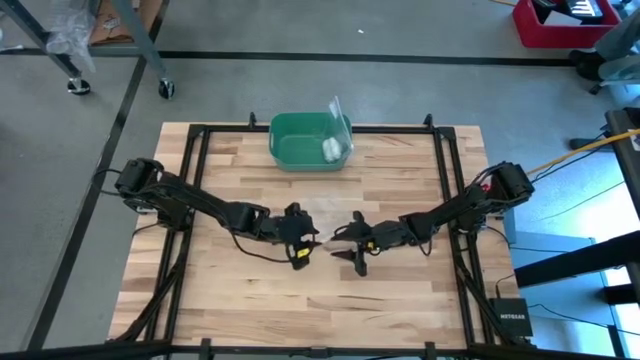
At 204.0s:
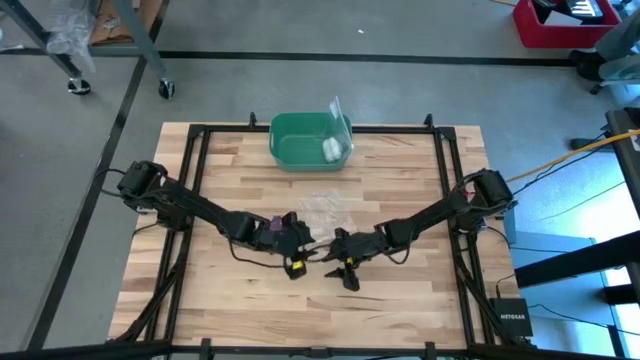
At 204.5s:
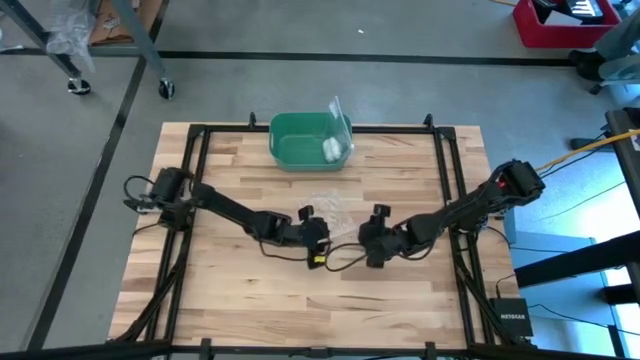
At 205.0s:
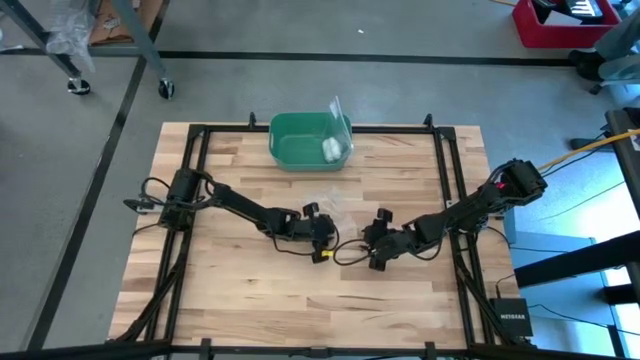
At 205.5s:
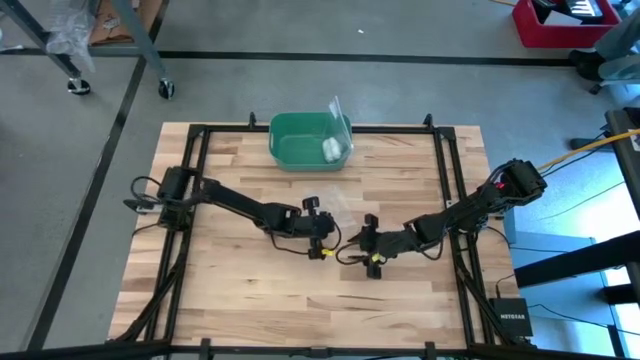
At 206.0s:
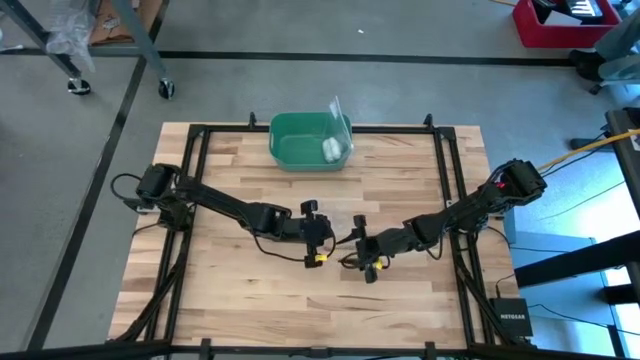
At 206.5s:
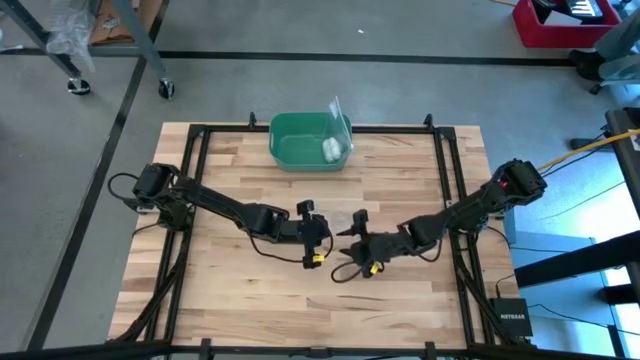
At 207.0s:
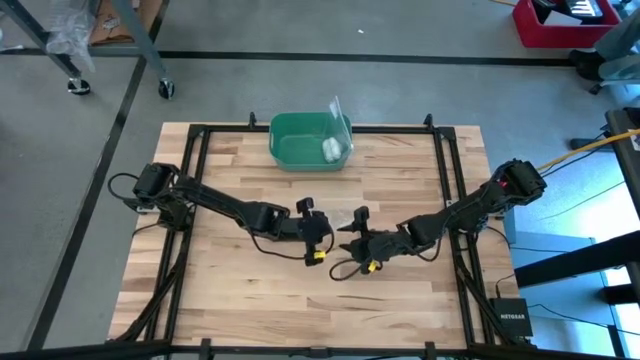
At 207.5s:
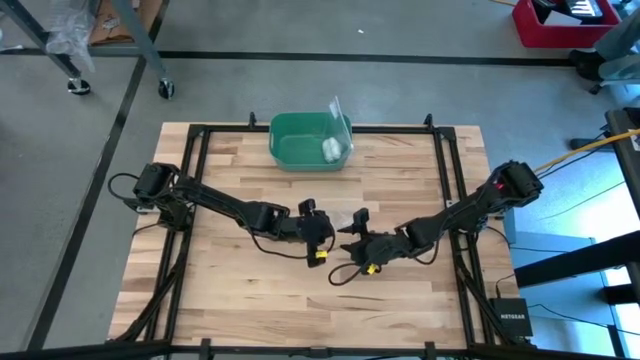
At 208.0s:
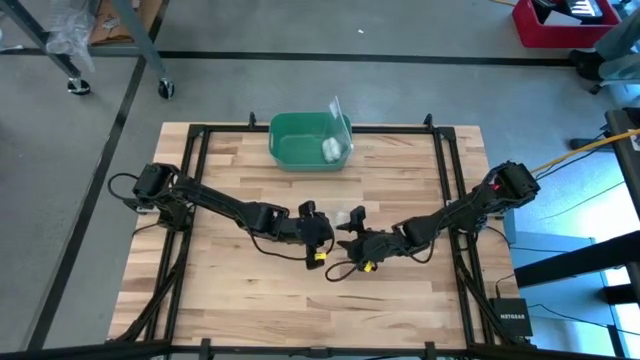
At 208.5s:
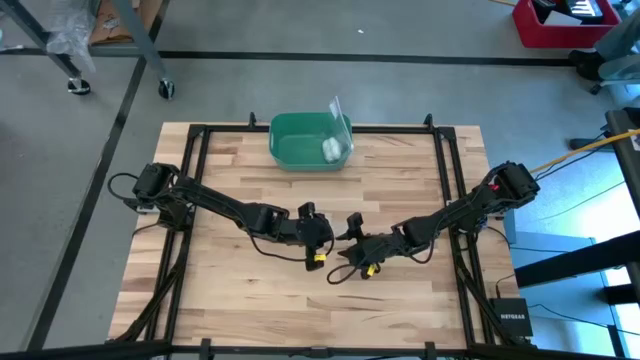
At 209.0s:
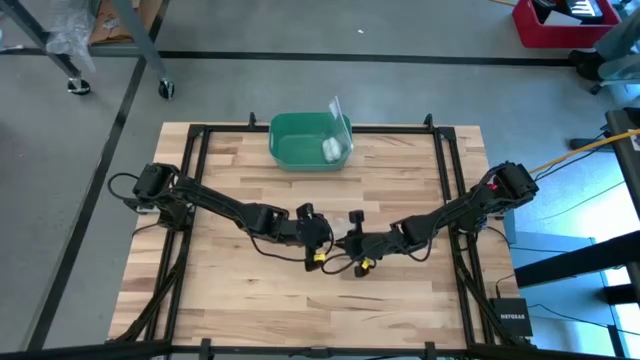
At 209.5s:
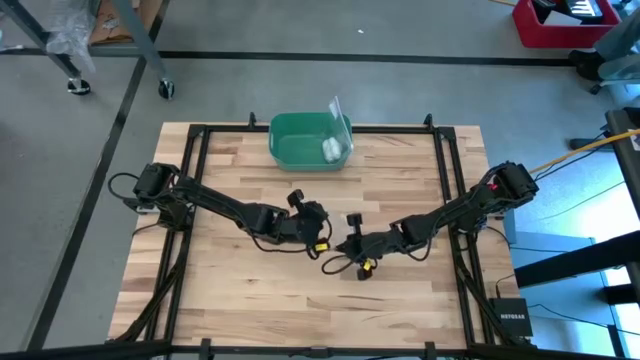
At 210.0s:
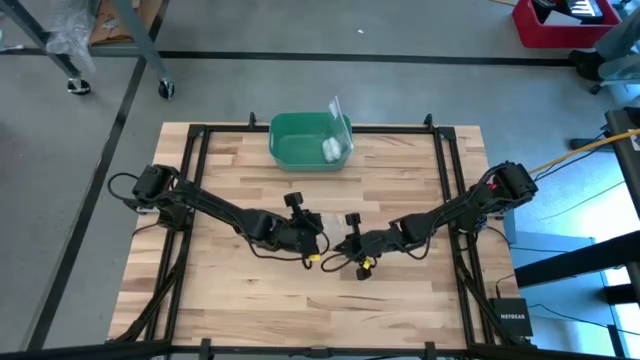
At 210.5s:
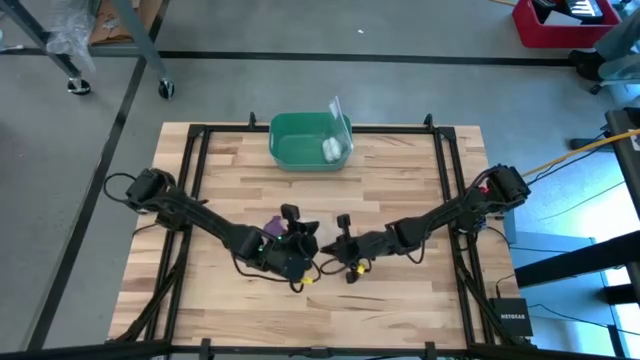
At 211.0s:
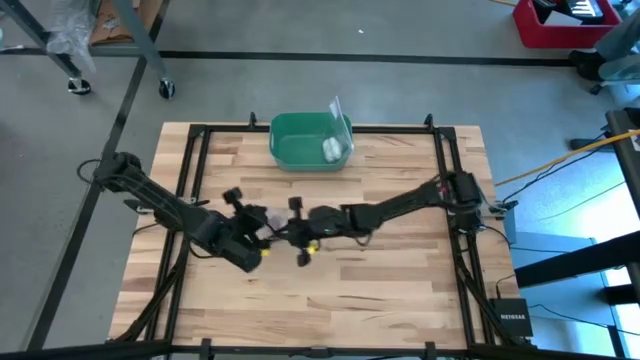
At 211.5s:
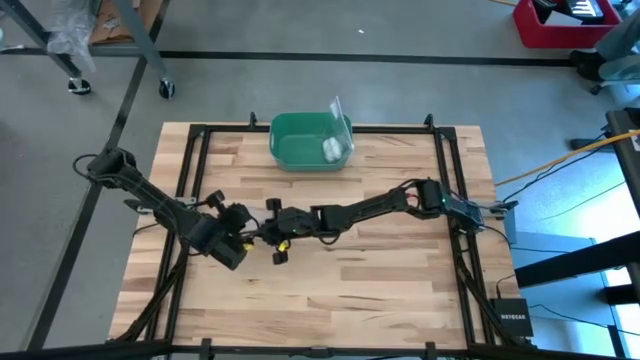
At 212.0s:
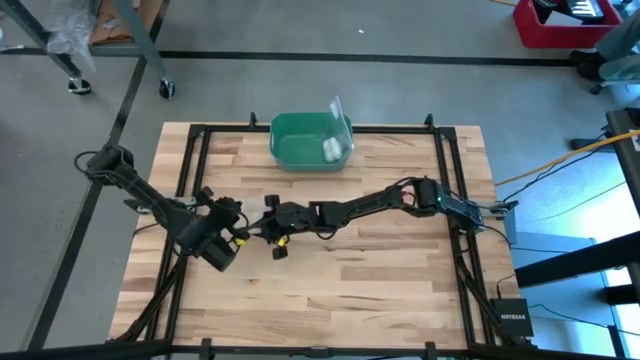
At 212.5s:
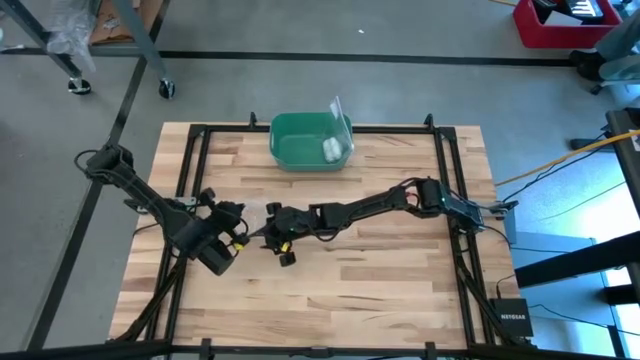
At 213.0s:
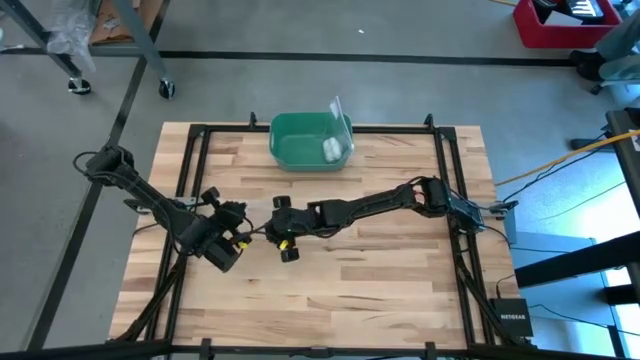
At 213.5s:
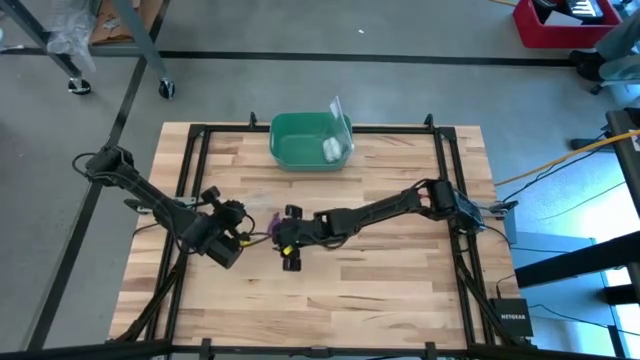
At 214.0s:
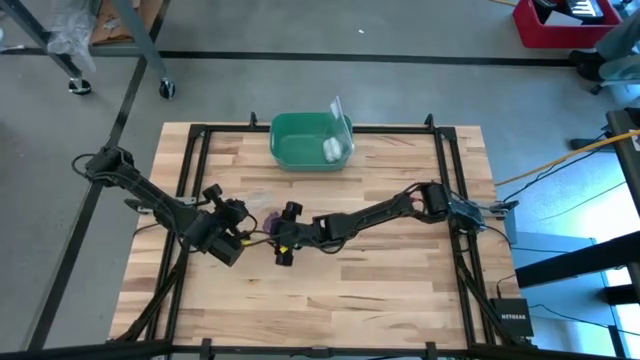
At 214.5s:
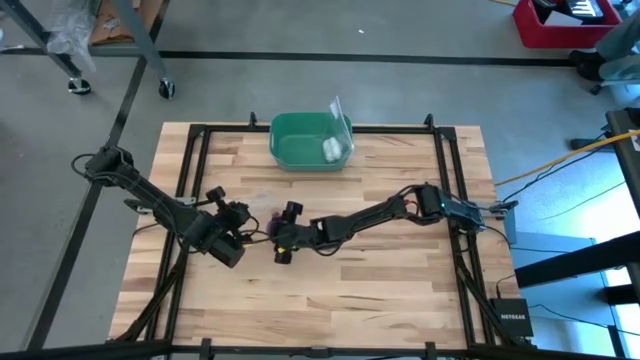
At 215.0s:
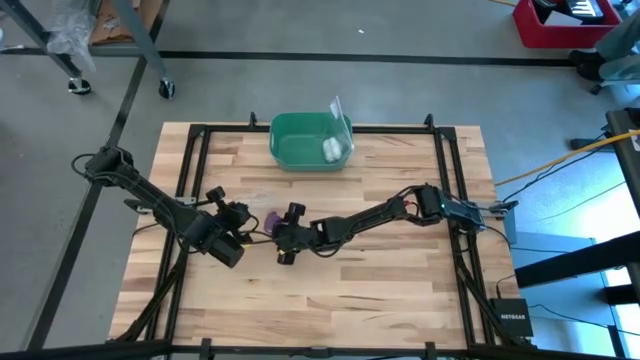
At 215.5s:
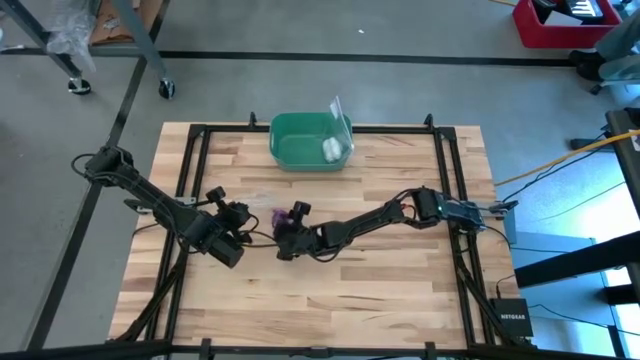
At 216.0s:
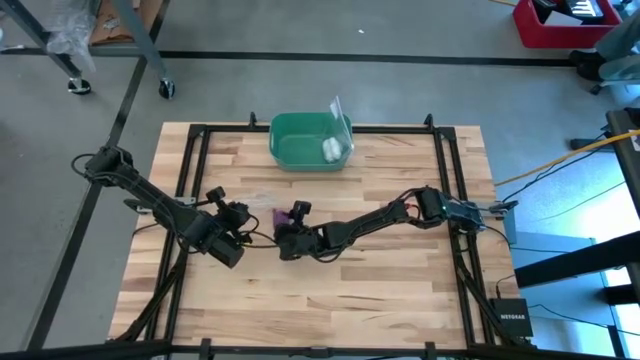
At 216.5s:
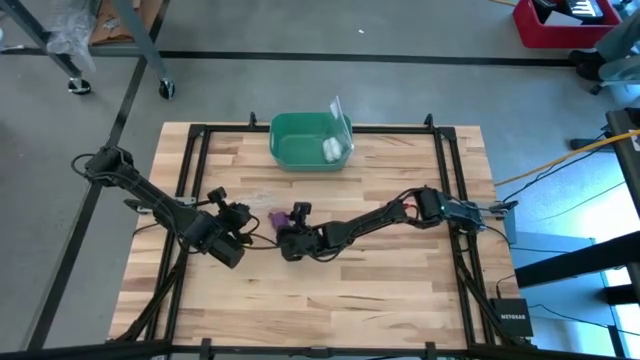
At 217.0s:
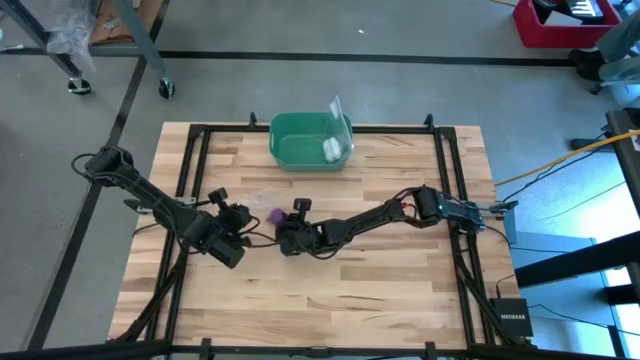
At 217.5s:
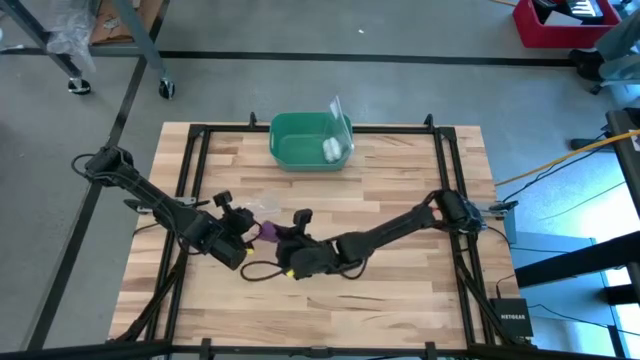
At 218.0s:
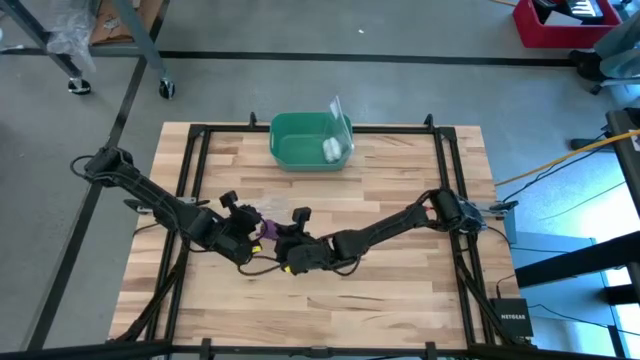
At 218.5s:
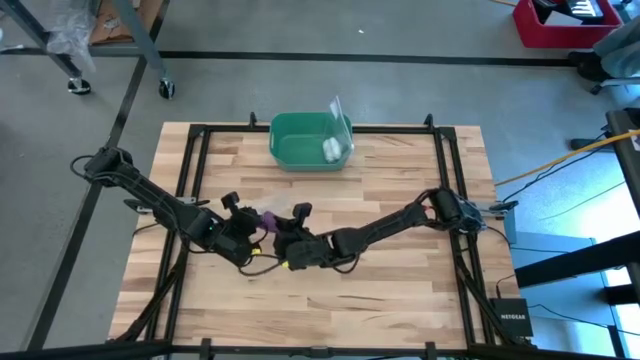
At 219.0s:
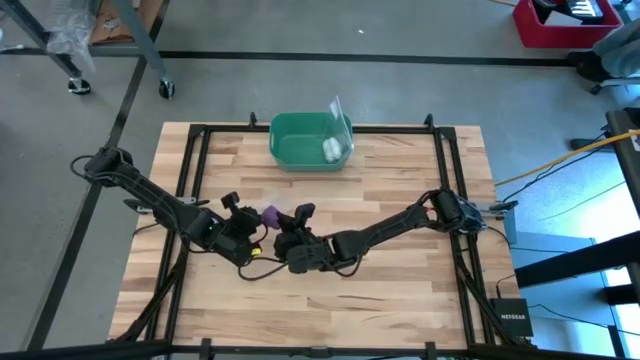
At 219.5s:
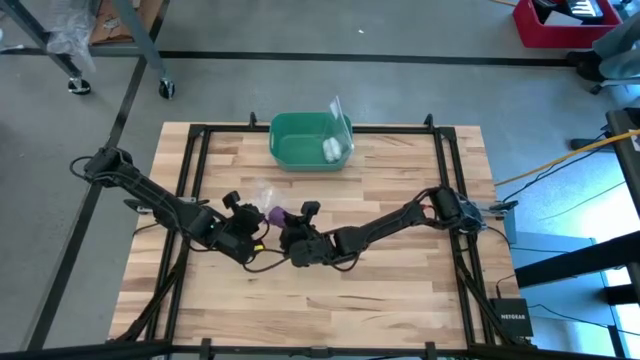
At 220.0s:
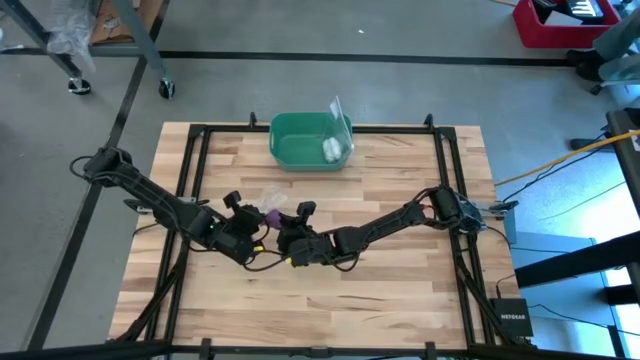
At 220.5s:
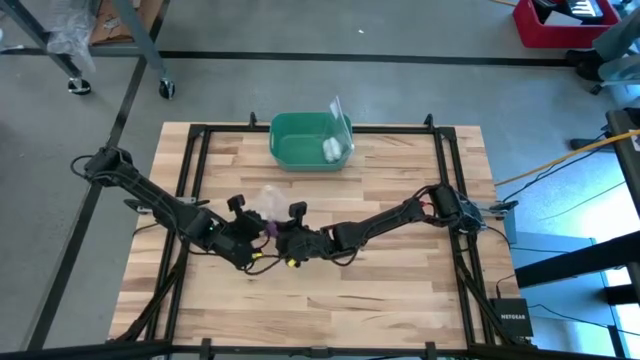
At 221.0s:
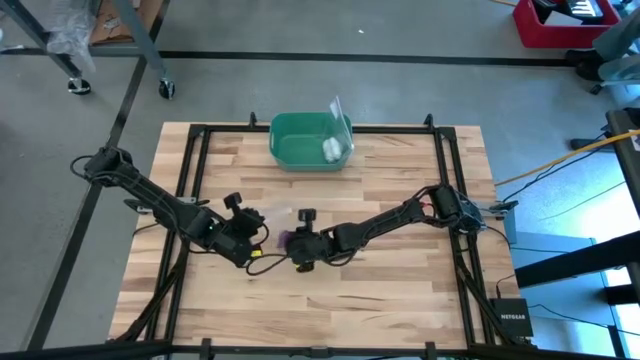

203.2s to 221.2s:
Task: Roll bandage
Put the violet bandage into the zip bag

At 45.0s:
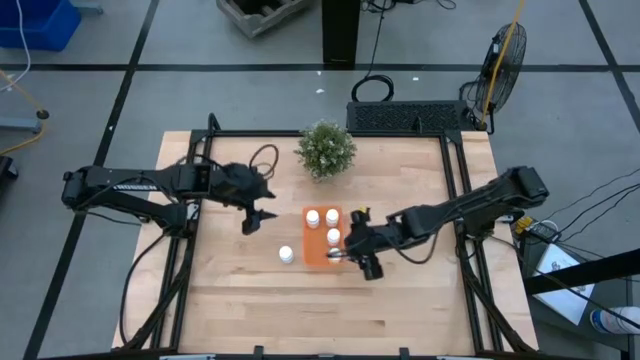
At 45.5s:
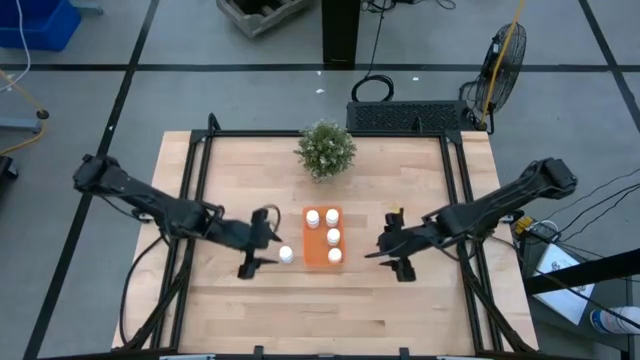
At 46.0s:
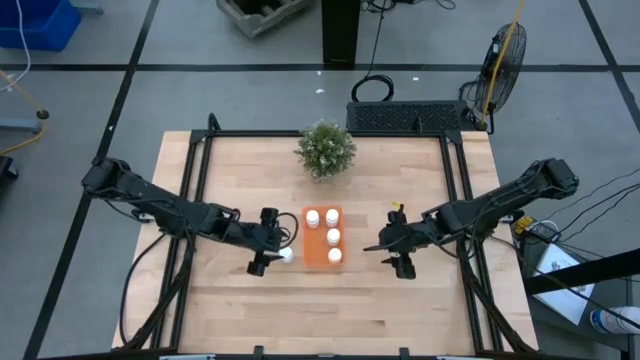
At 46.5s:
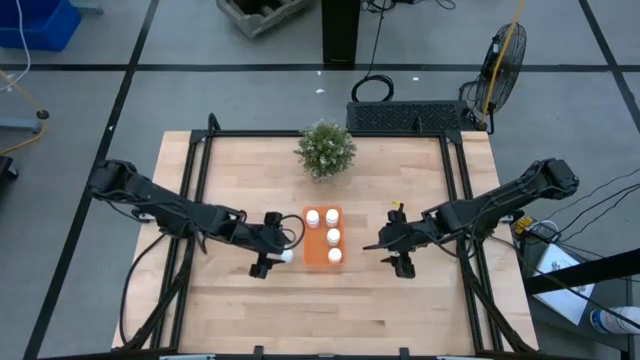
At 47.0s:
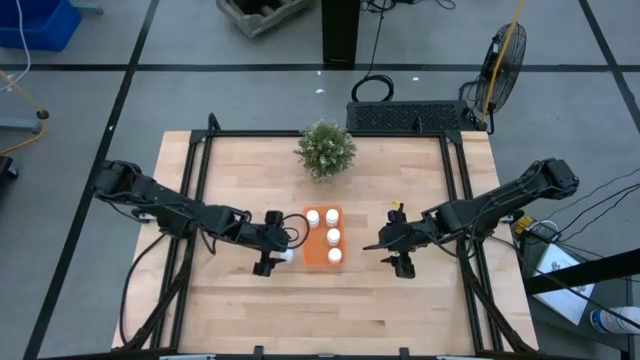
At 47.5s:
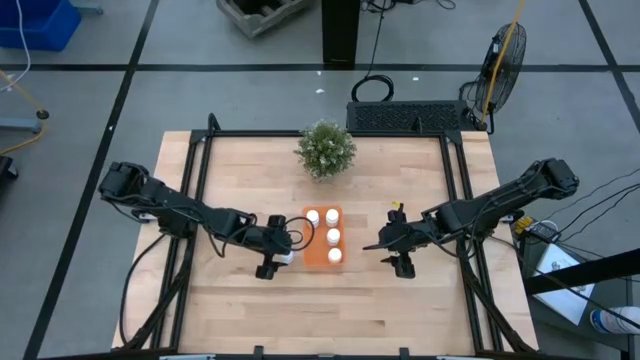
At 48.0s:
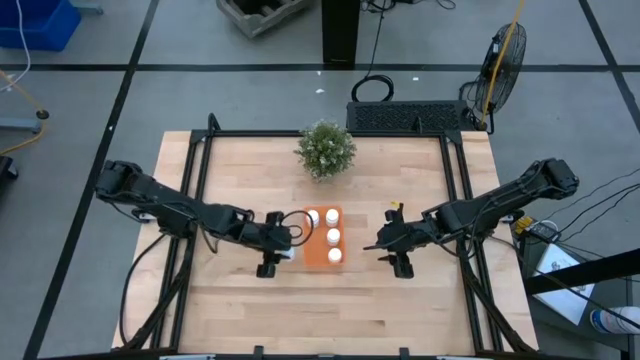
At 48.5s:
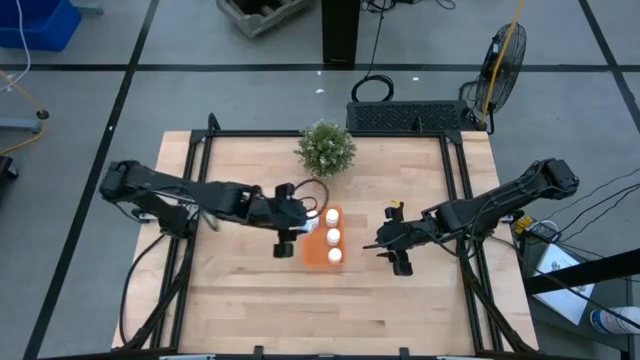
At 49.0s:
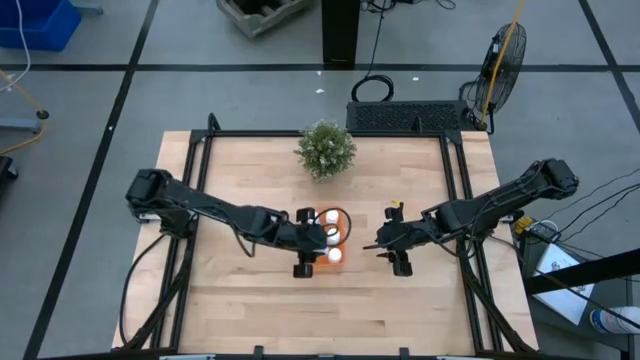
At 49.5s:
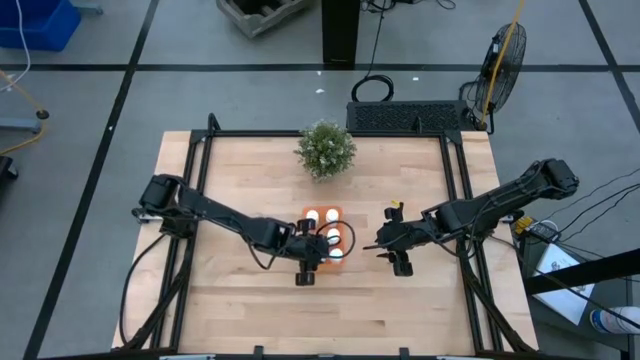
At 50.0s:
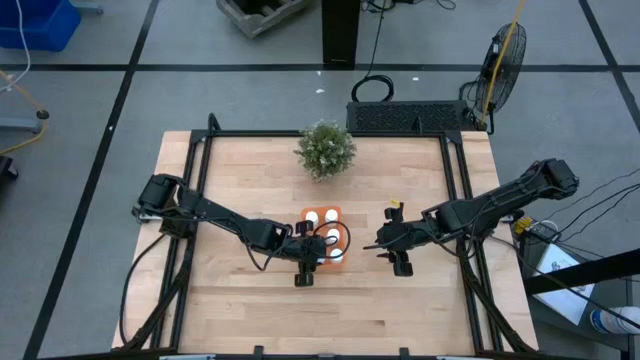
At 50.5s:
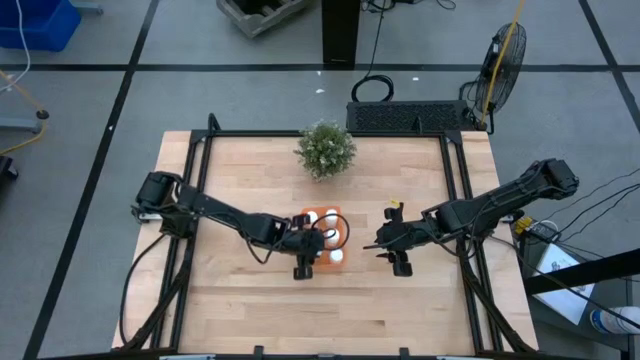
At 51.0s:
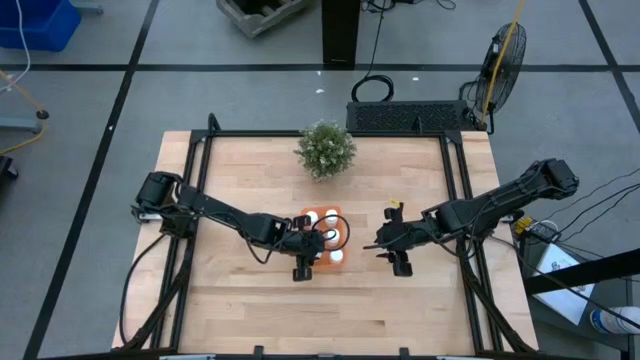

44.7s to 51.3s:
Task: Pick and place pill bottles into a basket
Put the white medicine bottle into the orange bin
